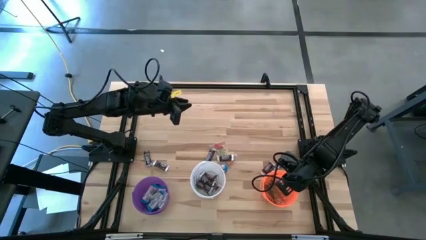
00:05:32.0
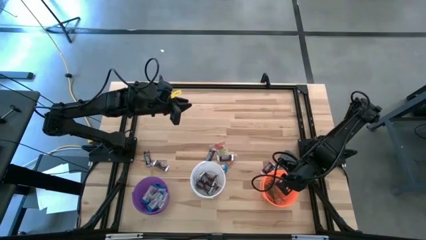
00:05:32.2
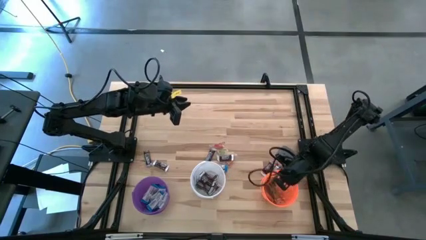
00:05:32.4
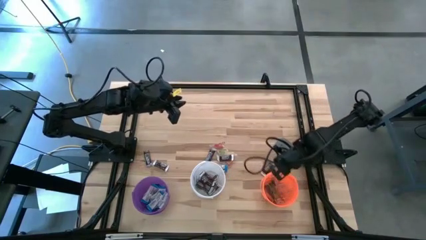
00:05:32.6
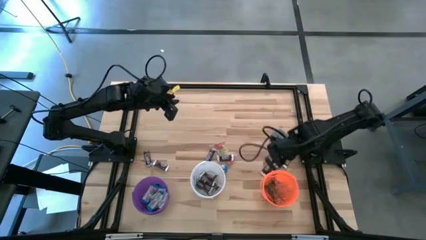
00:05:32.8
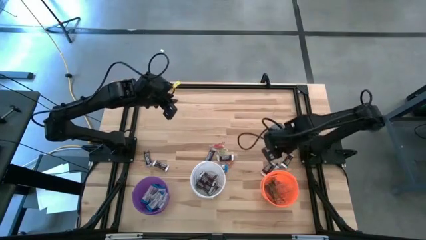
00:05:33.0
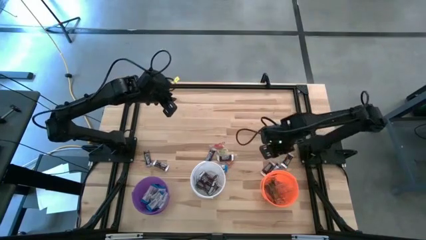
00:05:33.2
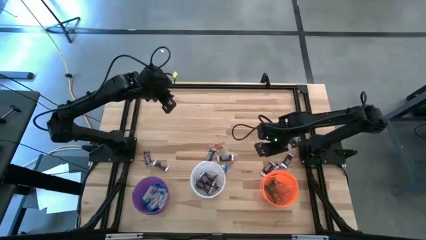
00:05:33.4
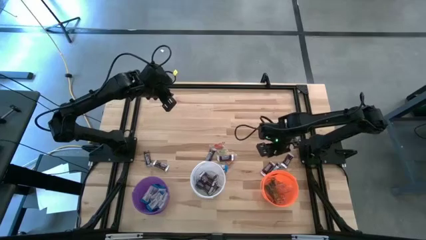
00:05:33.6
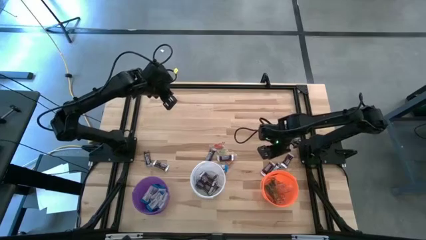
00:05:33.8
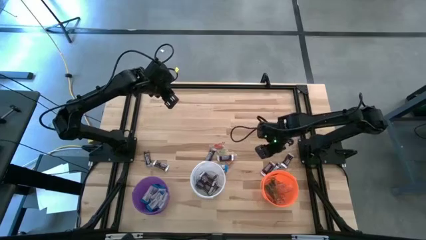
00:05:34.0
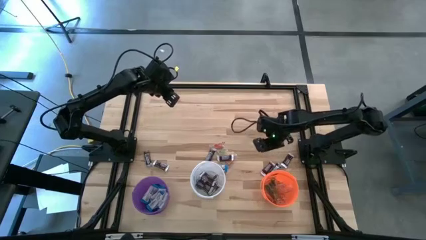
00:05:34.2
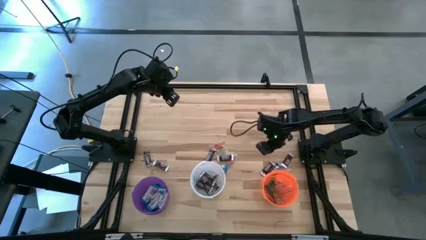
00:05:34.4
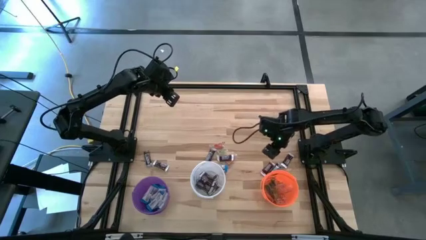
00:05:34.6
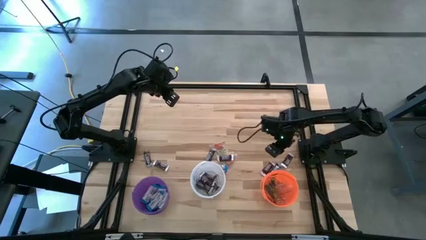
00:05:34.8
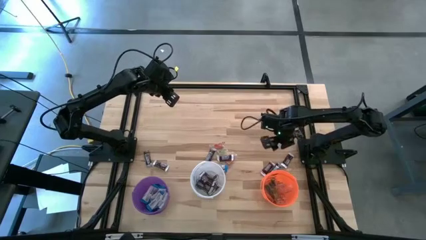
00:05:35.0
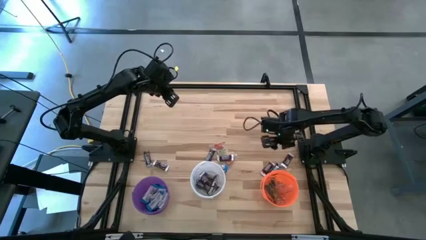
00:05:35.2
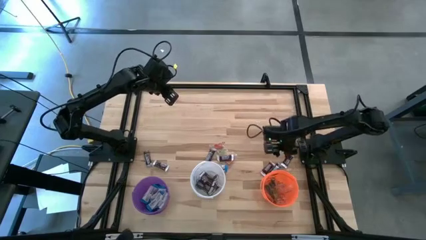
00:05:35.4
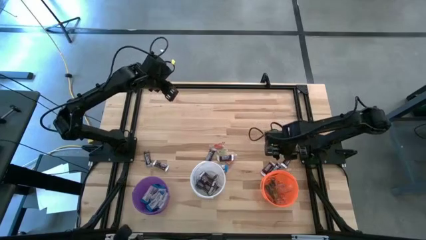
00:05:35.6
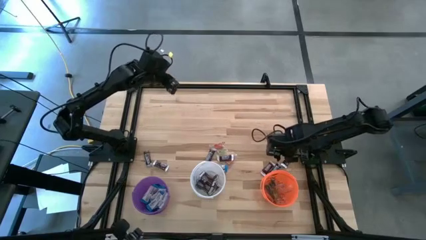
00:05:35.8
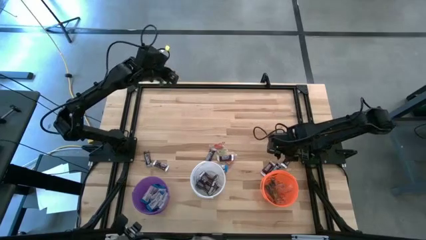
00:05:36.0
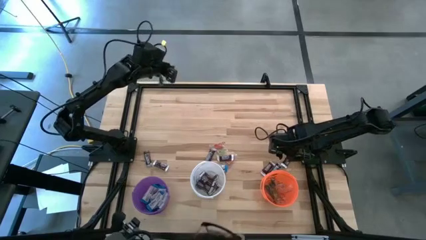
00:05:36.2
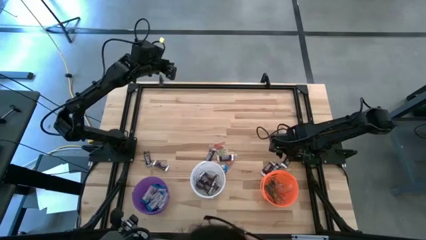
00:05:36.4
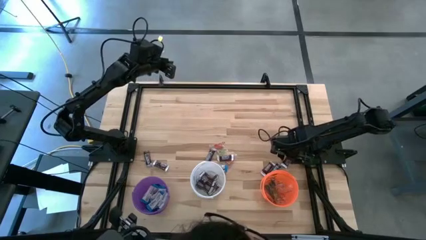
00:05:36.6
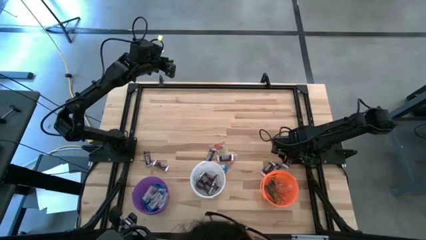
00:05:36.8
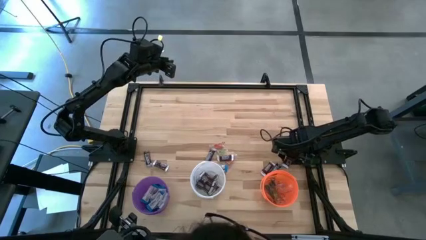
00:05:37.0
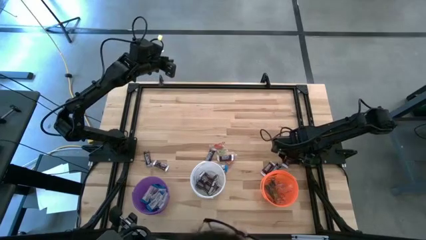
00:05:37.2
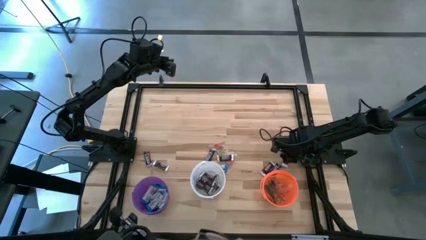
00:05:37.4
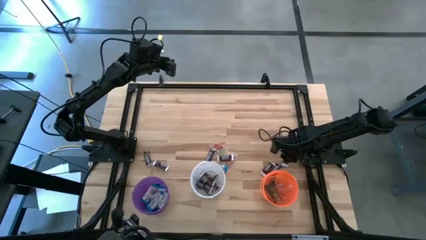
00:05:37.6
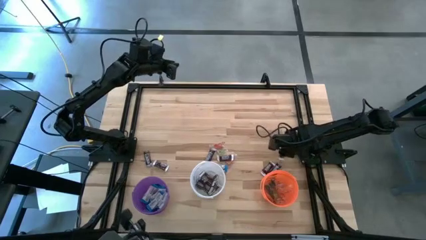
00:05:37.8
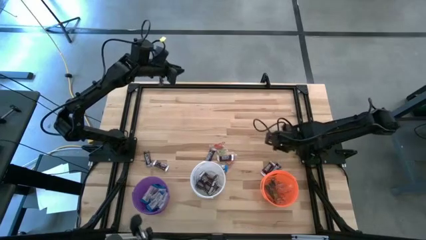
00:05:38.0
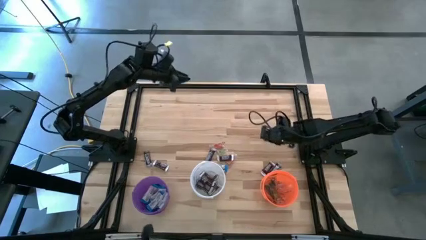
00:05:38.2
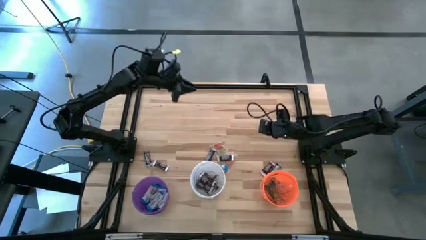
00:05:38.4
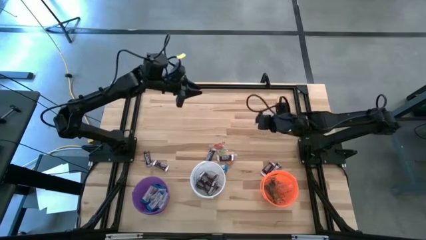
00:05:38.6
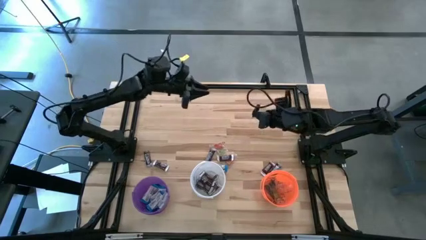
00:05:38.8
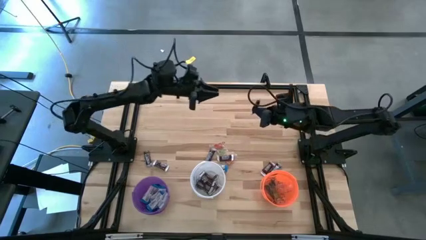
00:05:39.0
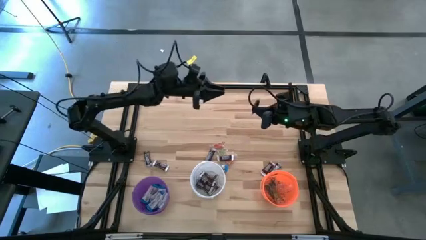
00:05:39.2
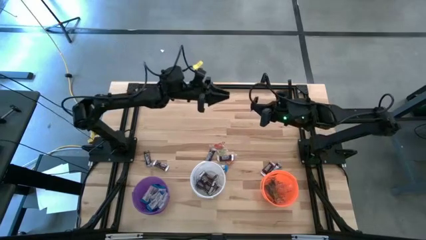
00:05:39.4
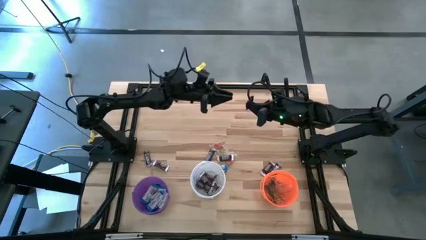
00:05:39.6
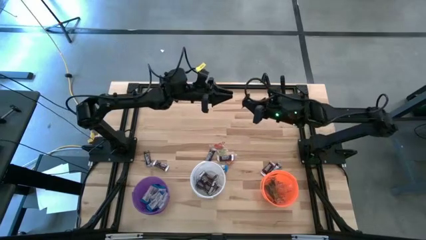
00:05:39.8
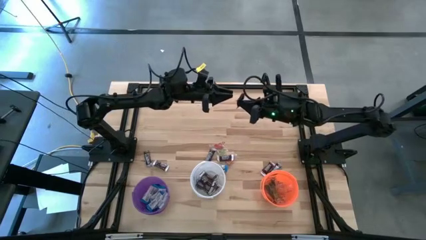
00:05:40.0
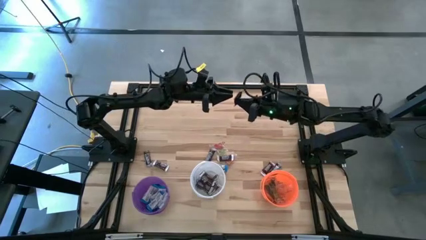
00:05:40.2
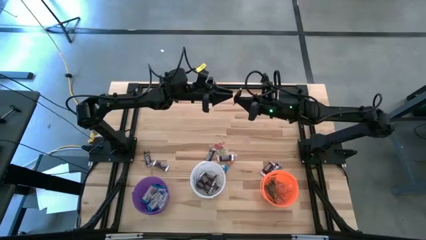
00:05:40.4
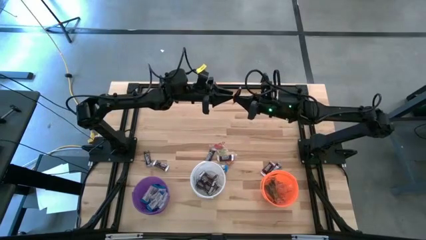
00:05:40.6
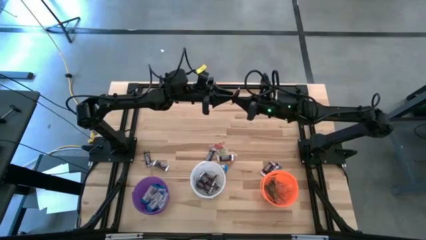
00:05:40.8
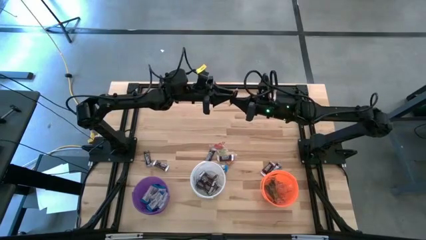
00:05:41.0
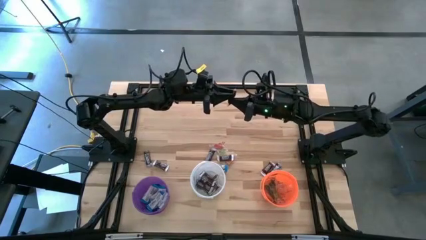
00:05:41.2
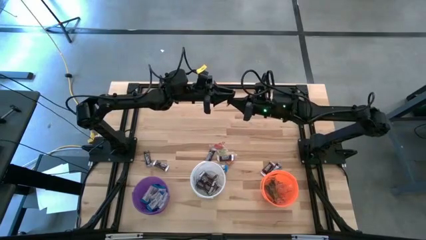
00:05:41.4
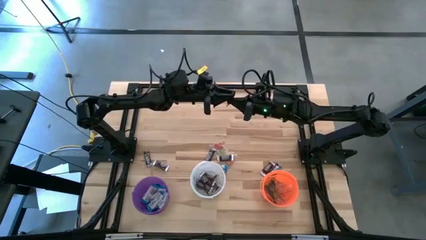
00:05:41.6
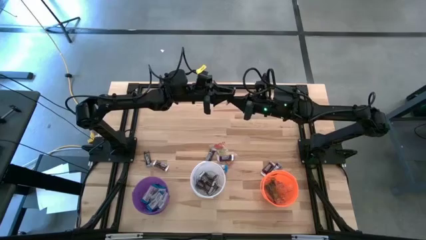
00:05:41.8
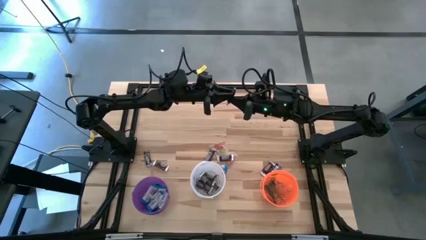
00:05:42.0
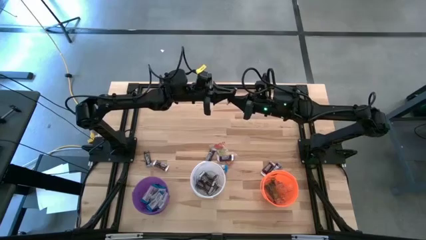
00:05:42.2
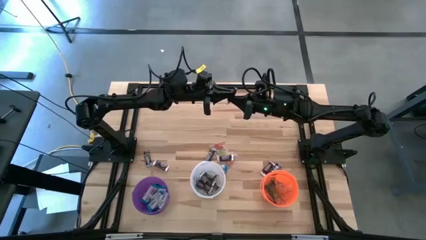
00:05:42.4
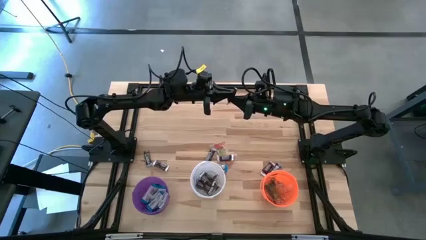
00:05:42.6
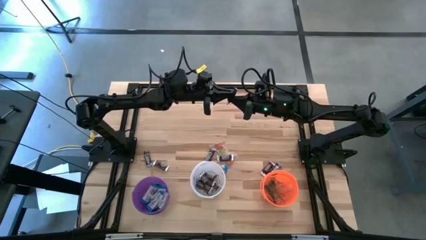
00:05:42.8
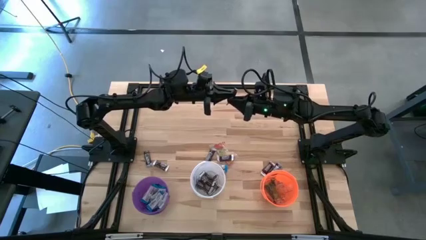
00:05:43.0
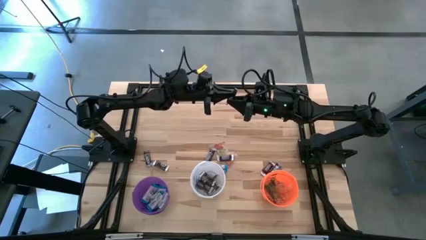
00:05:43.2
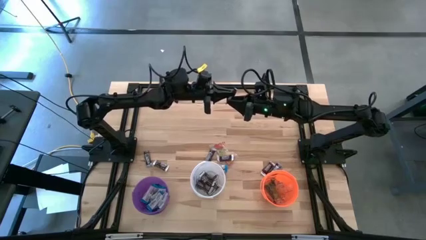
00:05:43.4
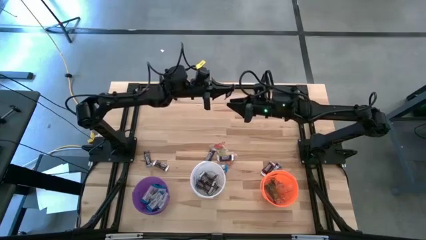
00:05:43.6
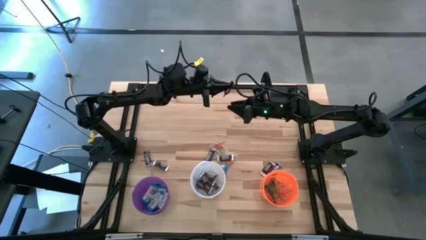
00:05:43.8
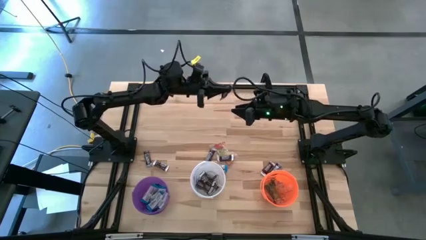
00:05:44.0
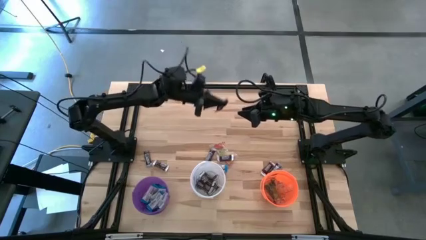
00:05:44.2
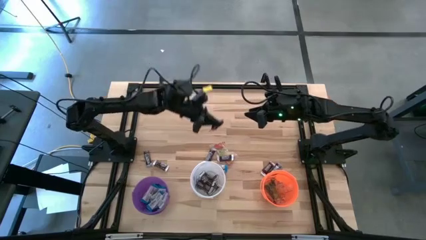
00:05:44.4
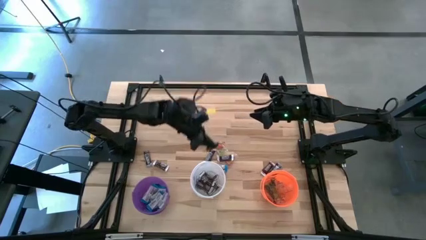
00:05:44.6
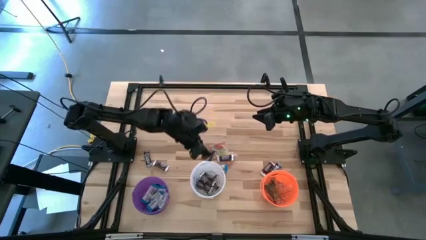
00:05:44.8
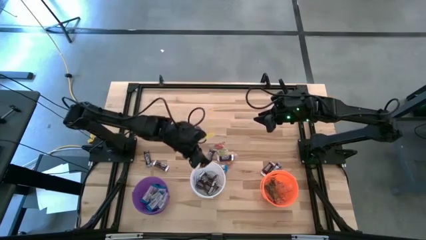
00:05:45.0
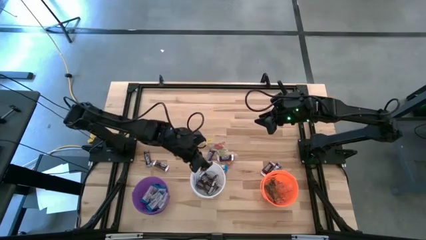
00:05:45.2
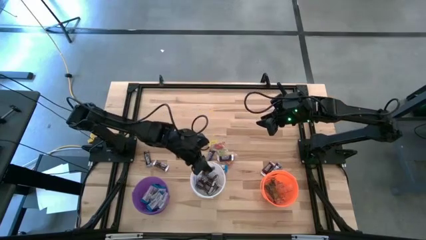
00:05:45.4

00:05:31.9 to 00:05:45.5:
Task: Sort candy
Put the brown chocolate into the white bucket
